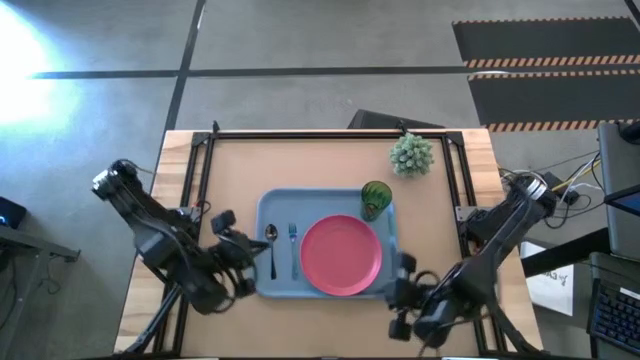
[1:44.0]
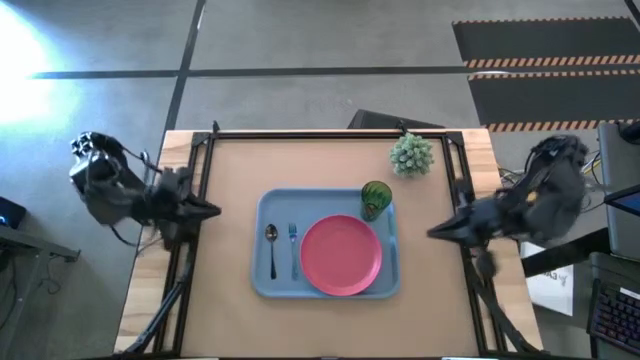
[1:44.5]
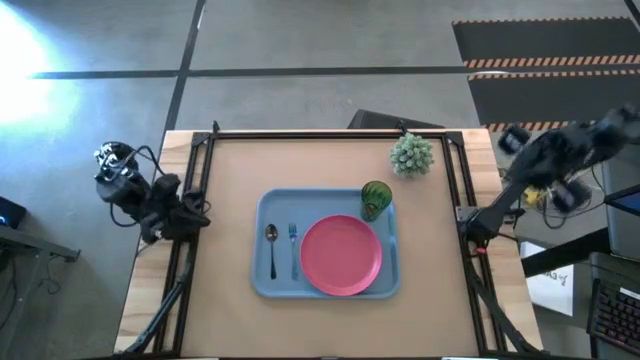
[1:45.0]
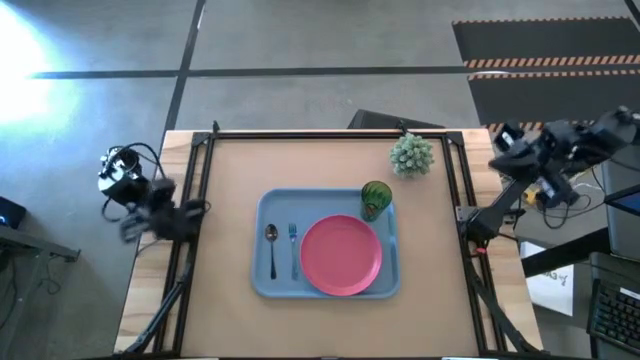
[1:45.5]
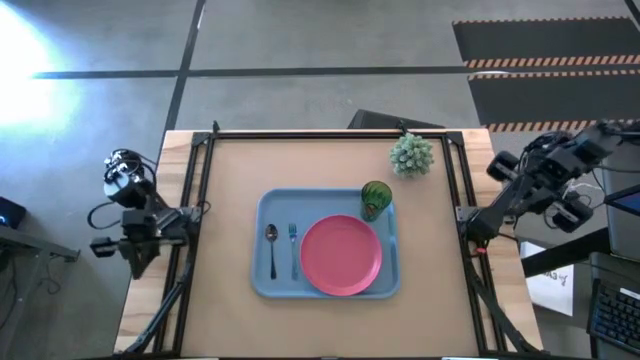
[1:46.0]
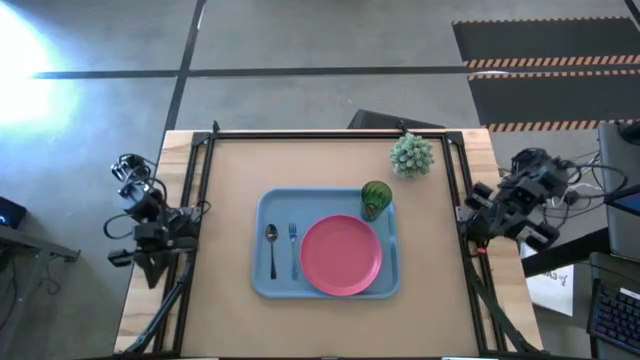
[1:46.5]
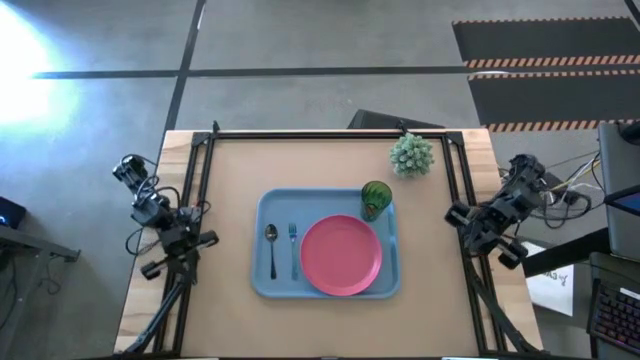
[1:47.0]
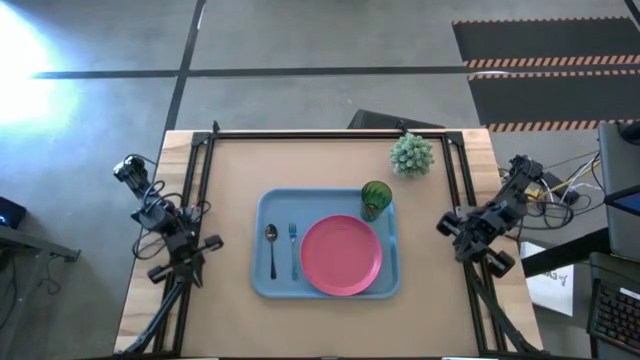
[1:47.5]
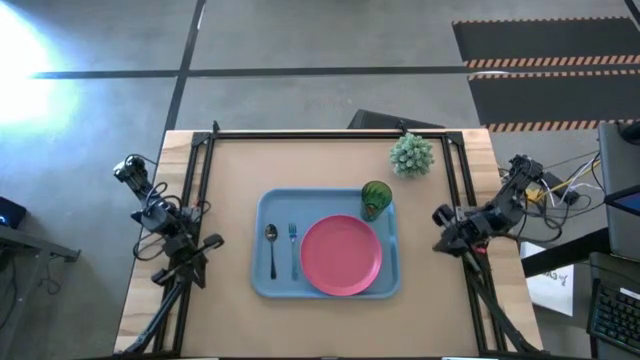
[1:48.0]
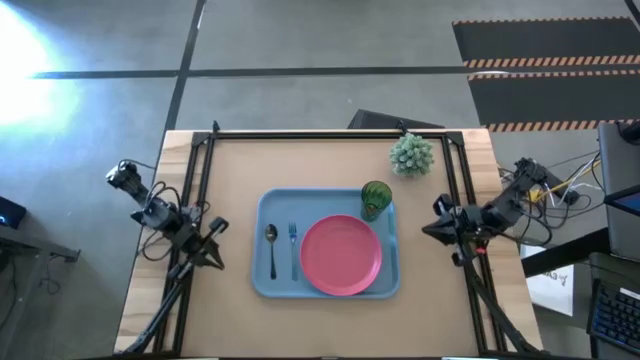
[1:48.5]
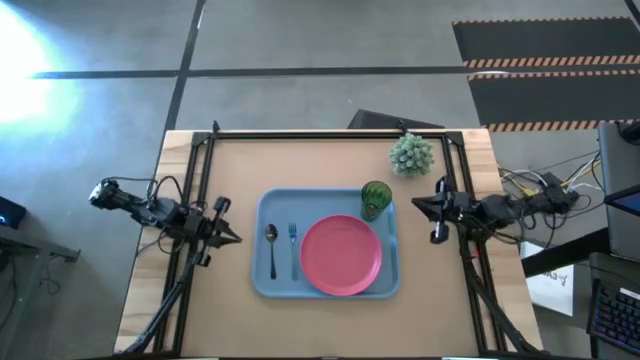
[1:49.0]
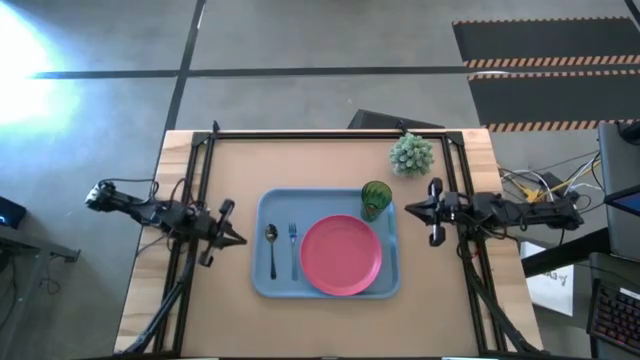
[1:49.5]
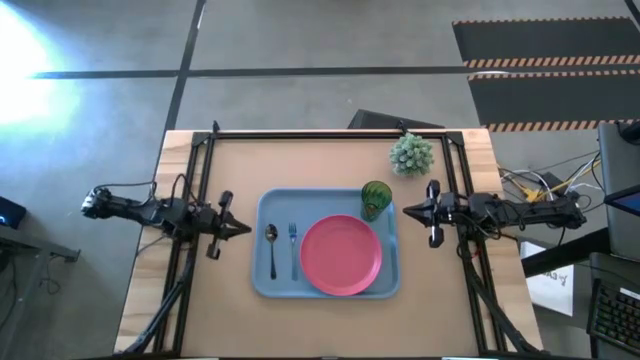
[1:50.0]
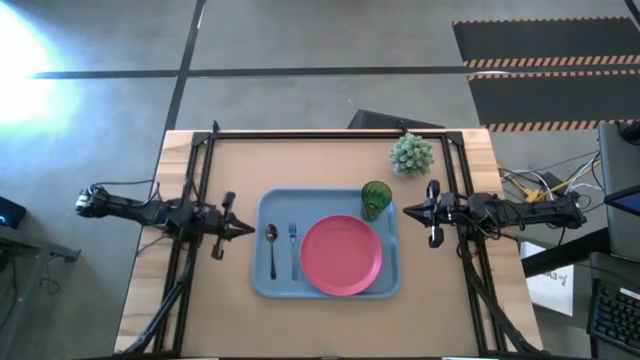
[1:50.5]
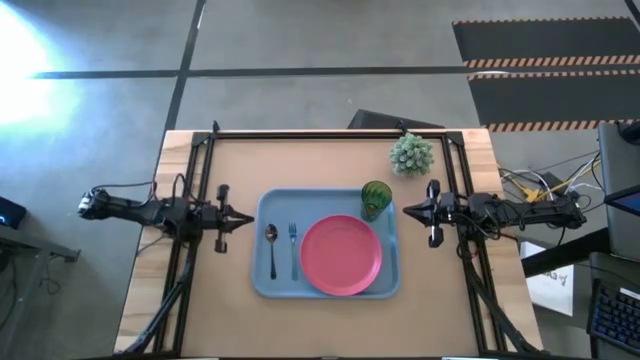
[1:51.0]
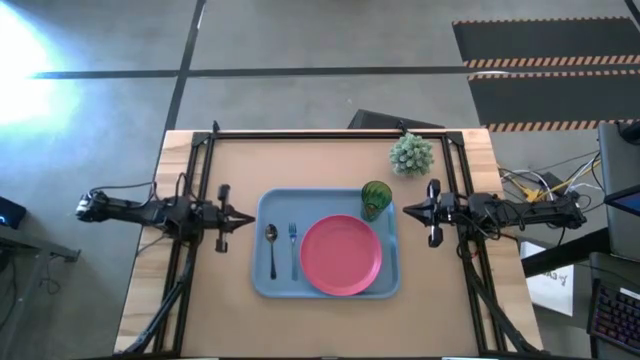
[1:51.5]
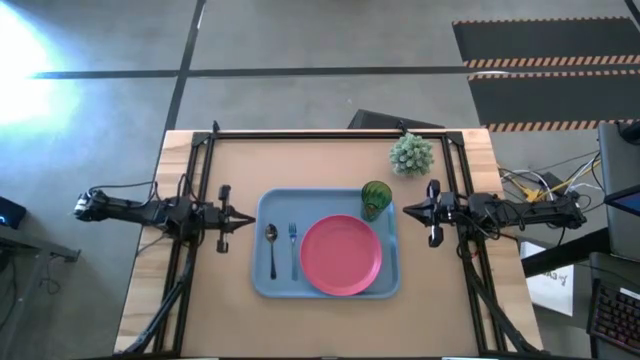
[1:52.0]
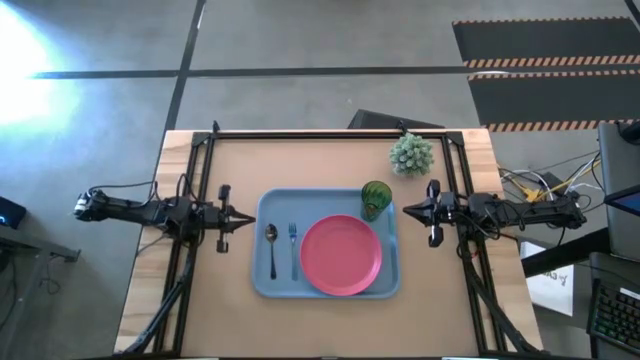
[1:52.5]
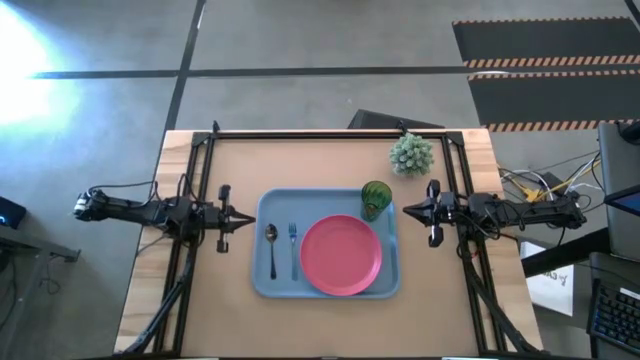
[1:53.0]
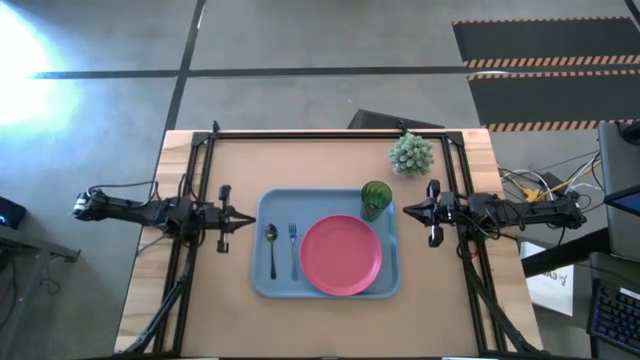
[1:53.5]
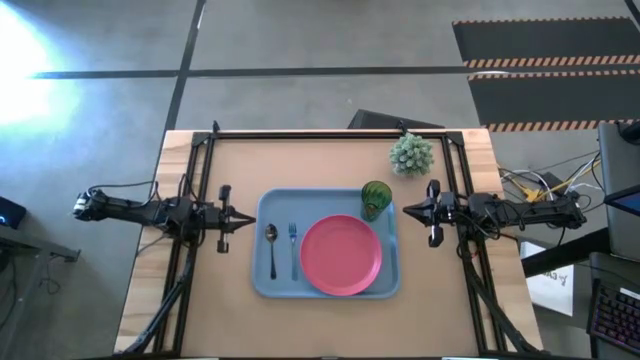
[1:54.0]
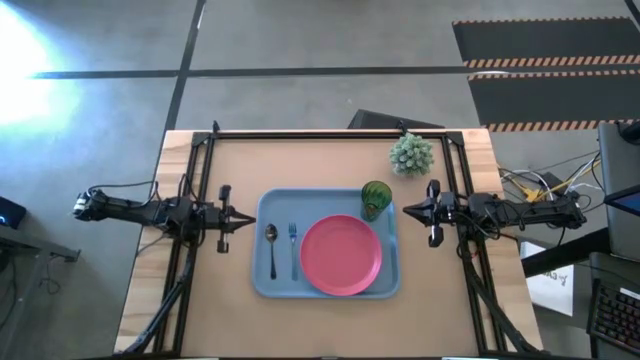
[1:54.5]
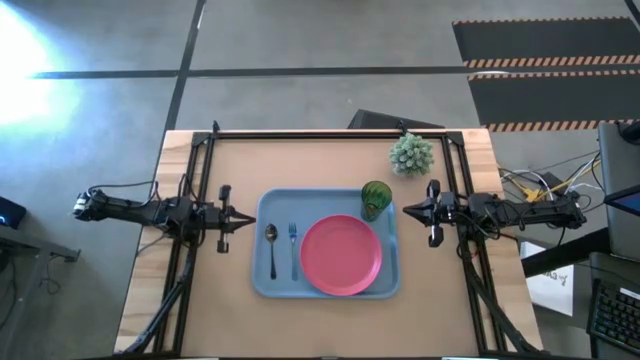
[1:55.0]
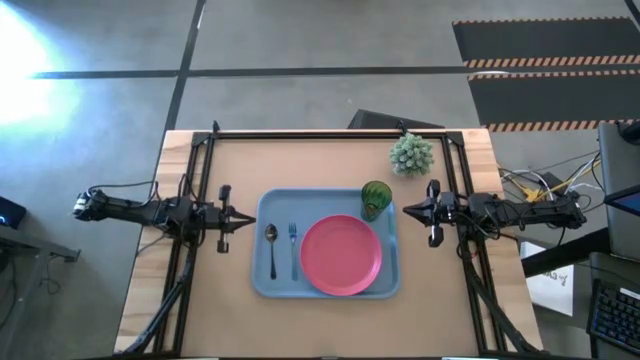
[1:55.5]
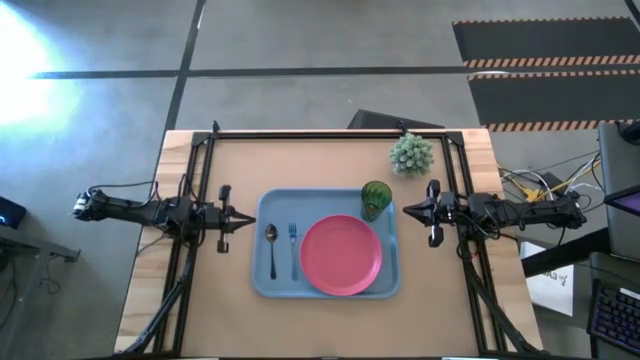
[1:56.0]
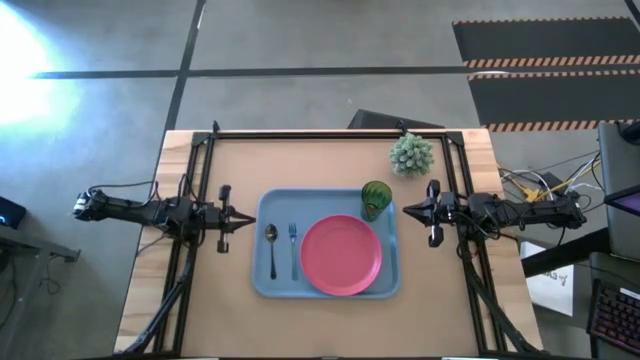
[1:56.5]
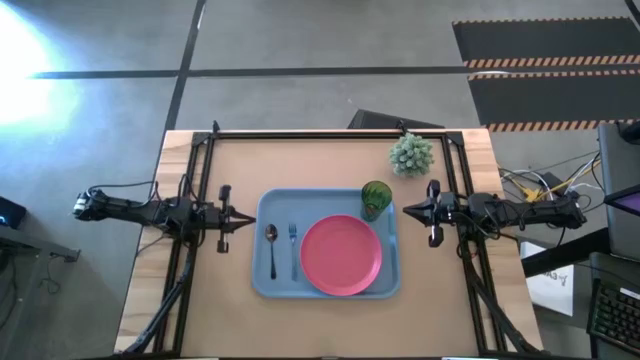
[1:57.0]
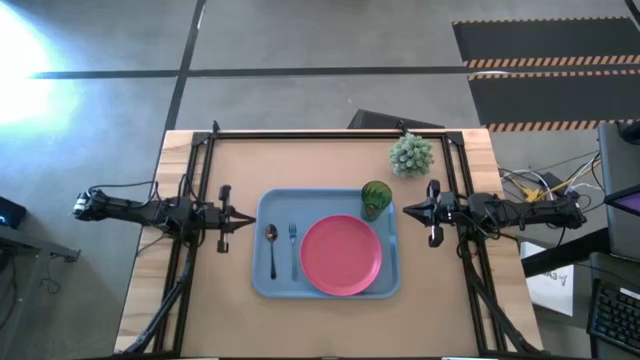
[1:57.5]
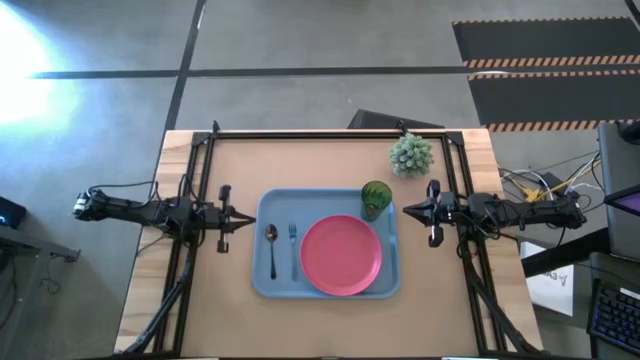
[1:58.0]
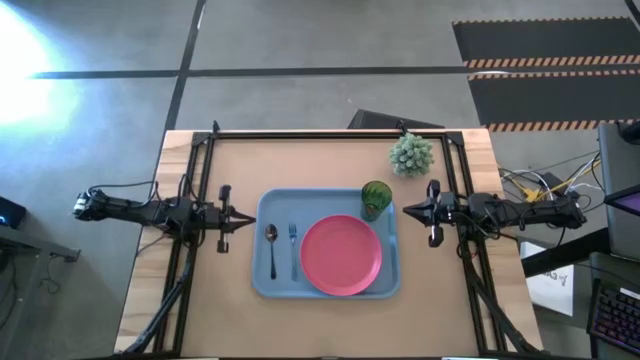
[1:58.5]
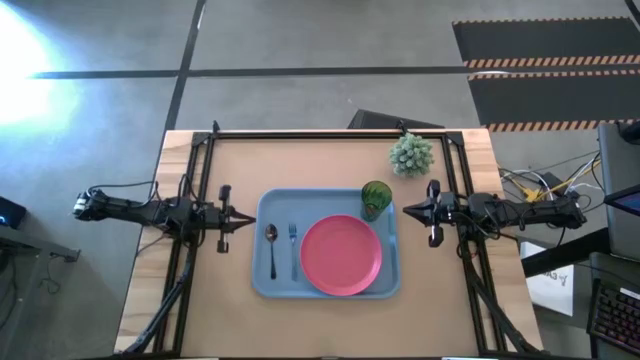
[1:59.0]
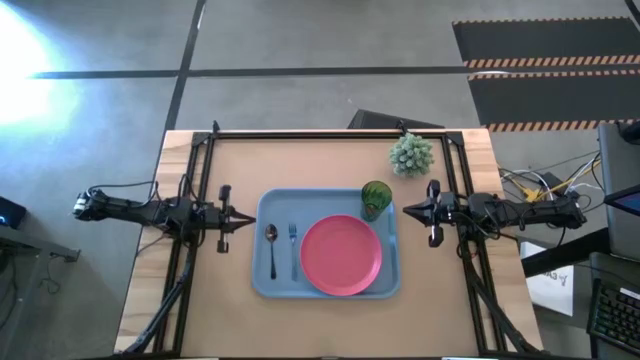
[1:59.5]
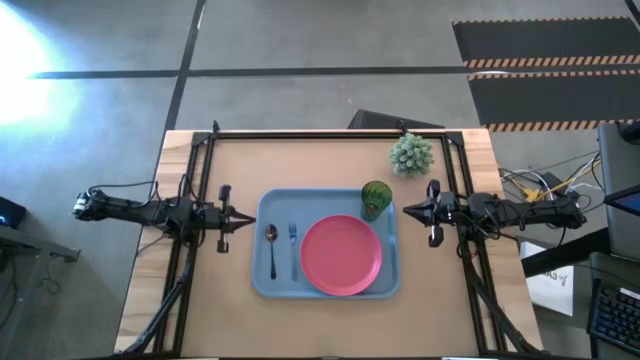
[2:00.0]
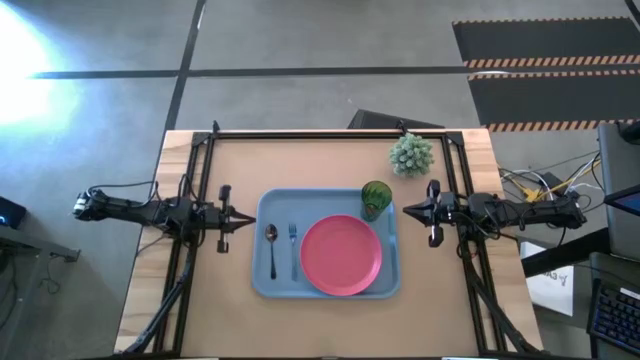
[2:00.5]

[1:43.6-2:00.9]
Task: Pick and place plate/cup/fork/spoon on tray
Return to Home Position

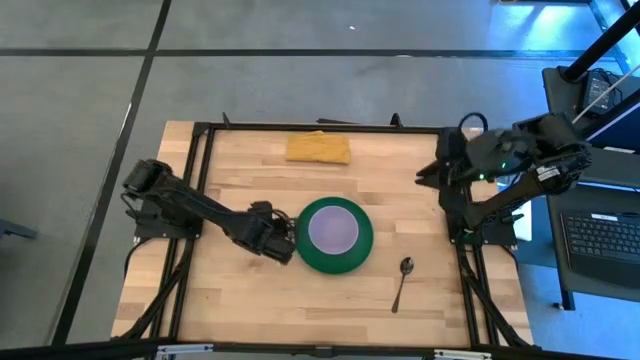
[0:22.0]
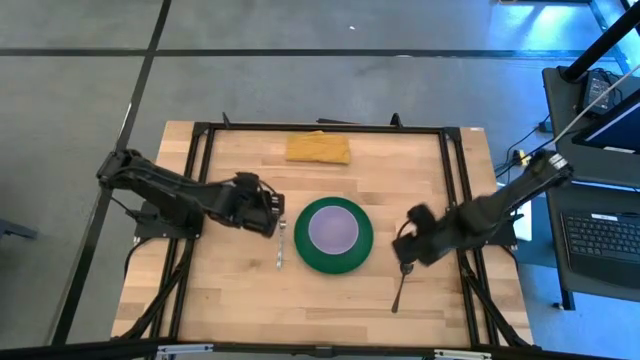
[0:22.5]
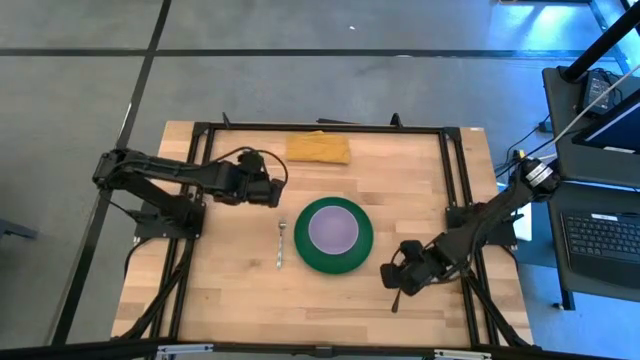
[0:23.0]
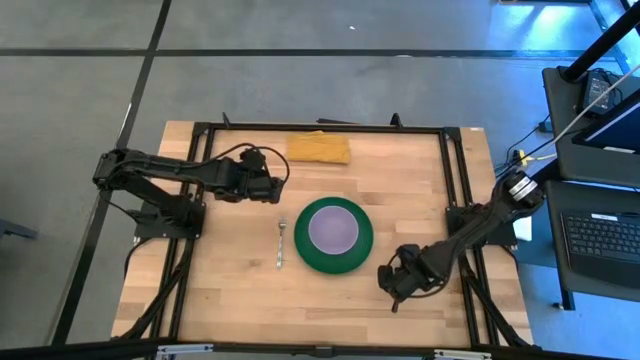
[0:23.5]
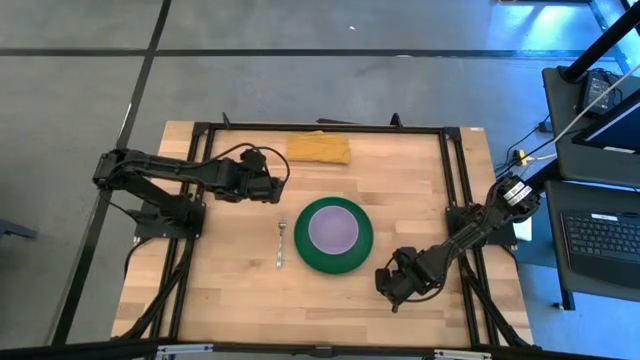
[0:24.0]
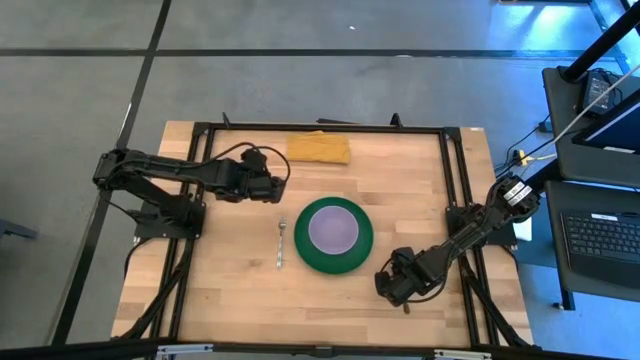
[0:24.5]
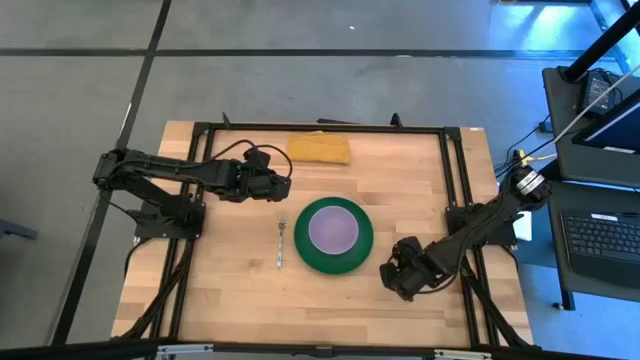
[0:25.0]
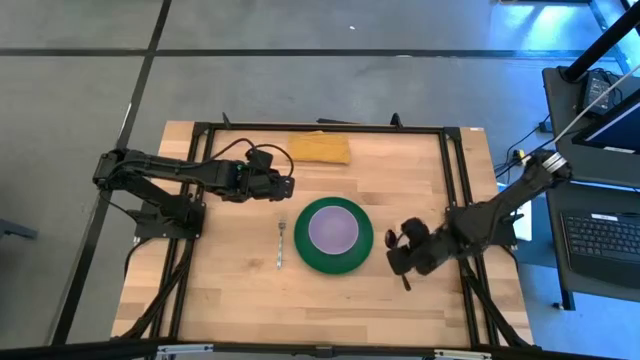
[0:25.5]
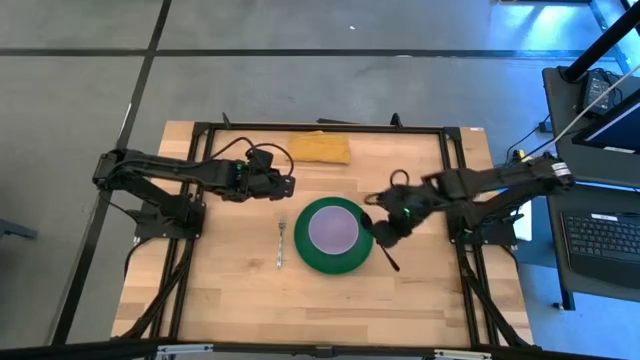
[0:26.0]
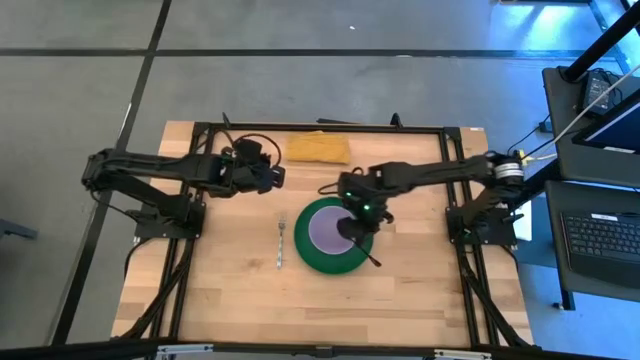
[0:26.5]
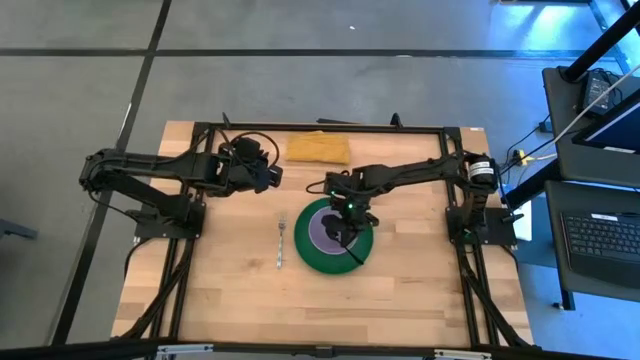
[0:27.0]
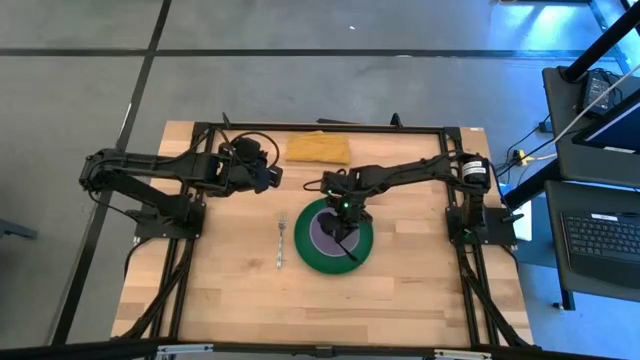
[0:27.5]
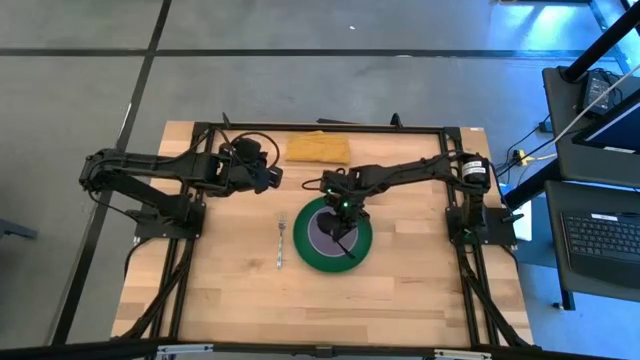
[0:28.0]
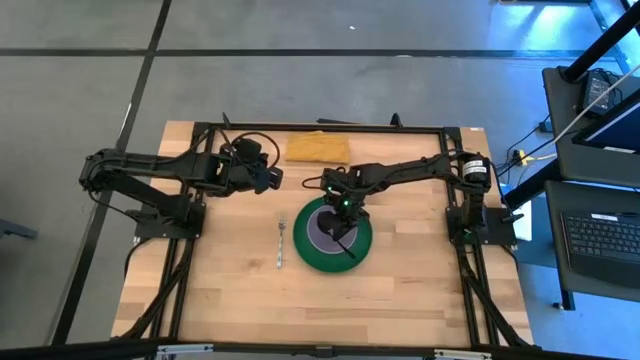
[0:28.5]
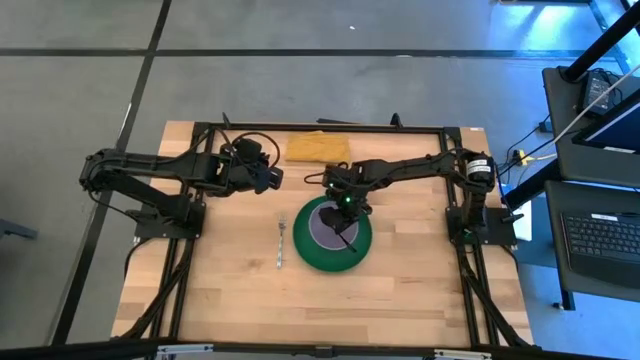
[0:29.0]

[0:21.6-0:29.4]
Task: Set table place
Put the spoon into the white bowl
